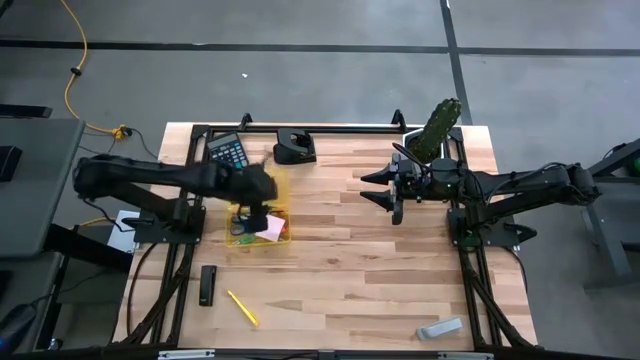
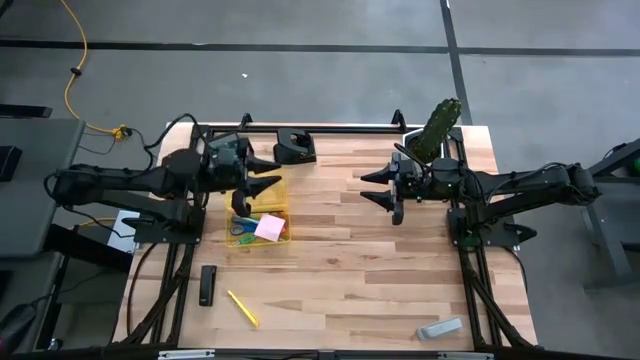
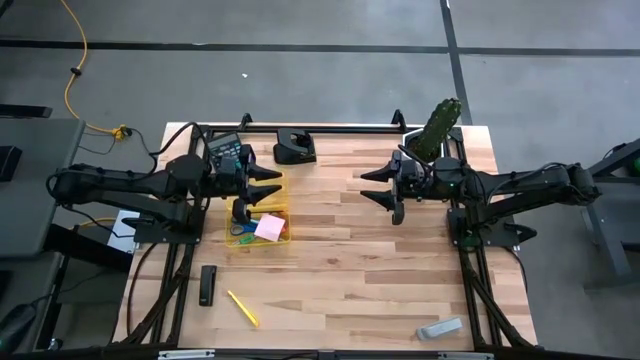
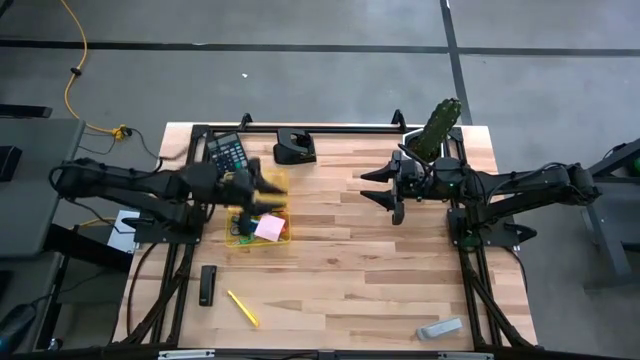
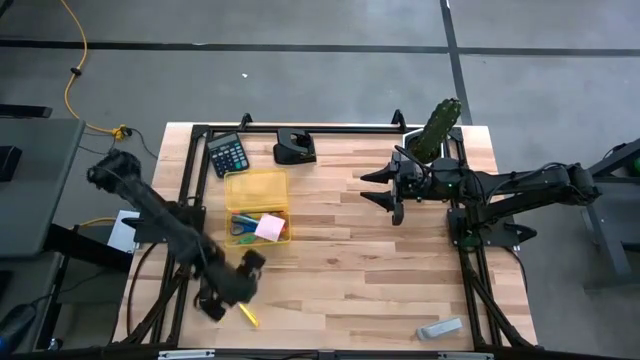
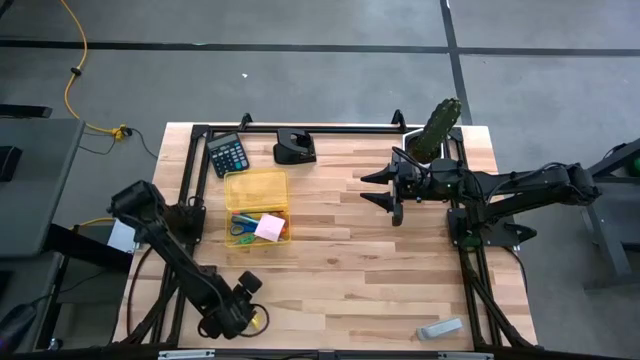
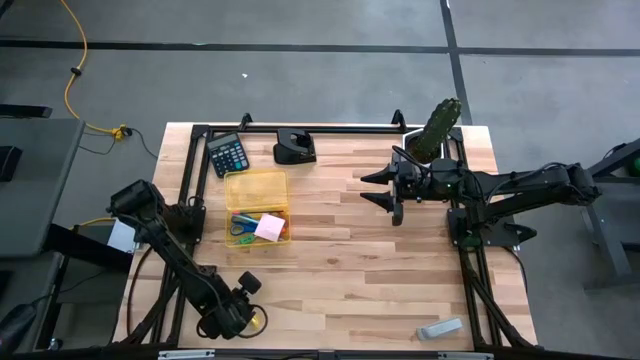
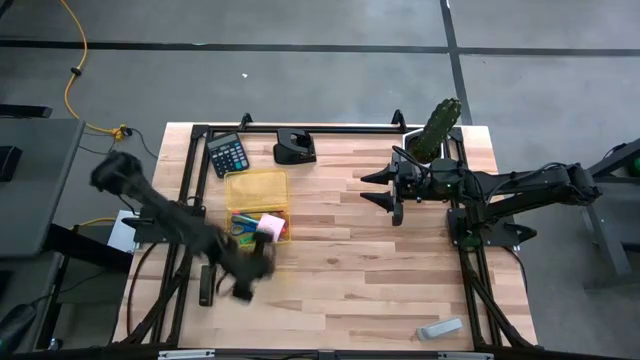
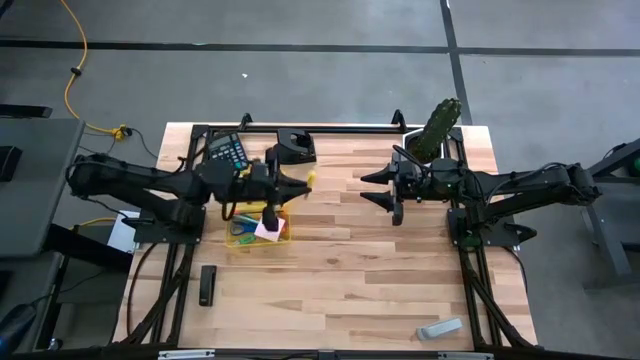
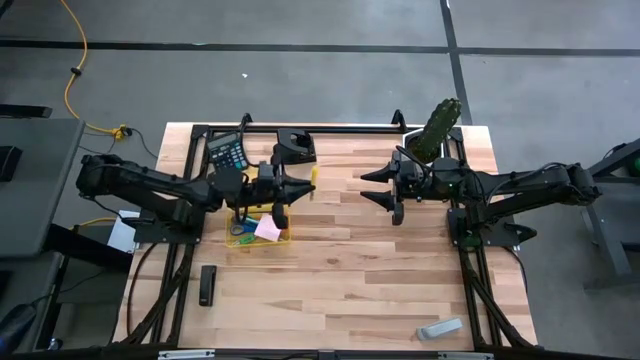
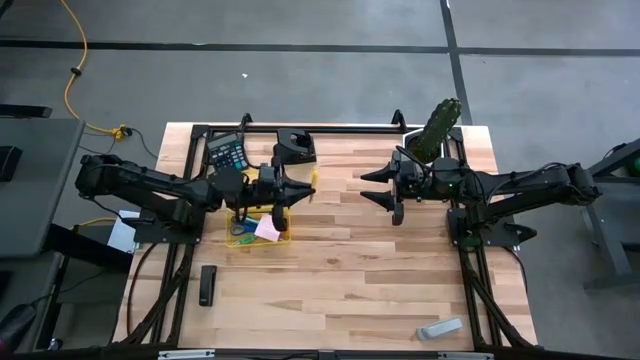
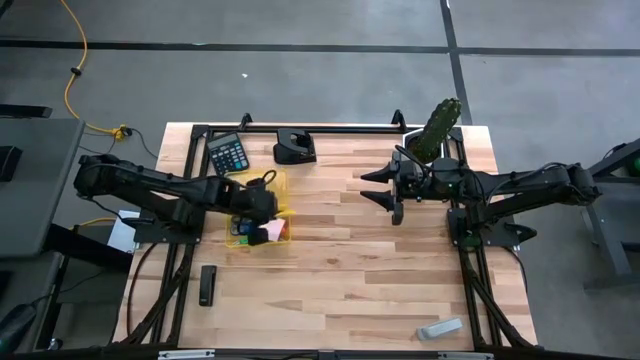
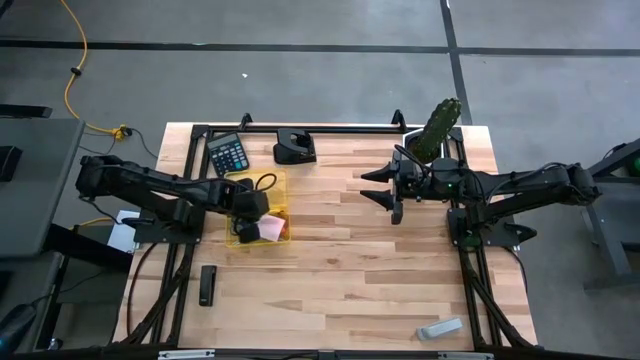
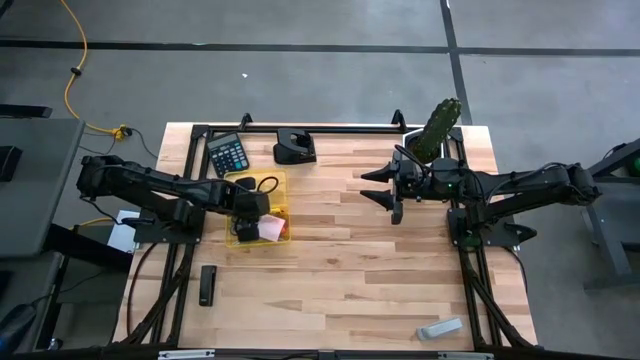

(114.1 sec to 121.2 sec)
Task: Pack school essentials
Put the yellow pen into the yellow supply box

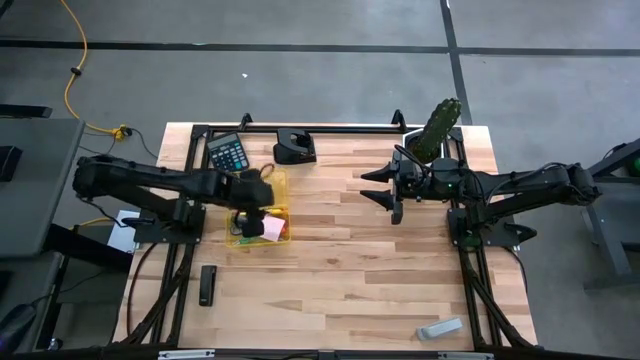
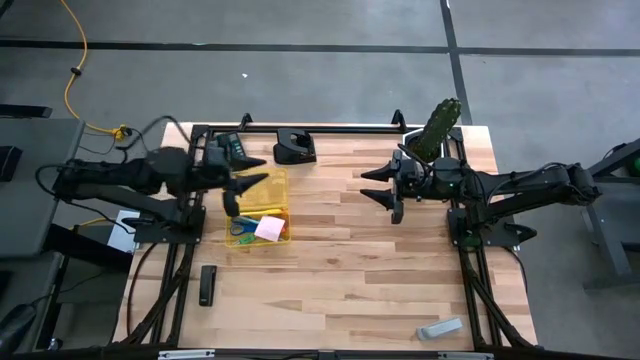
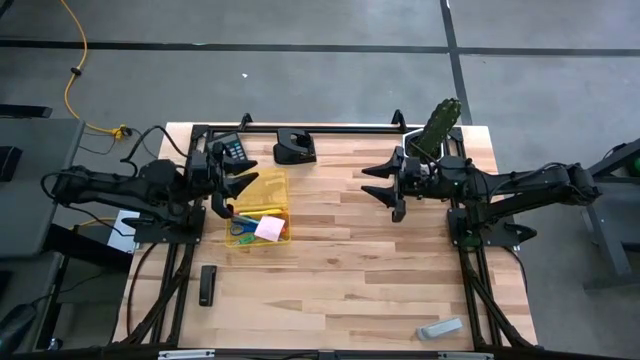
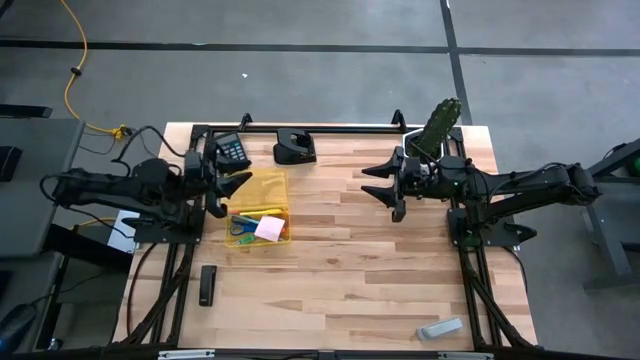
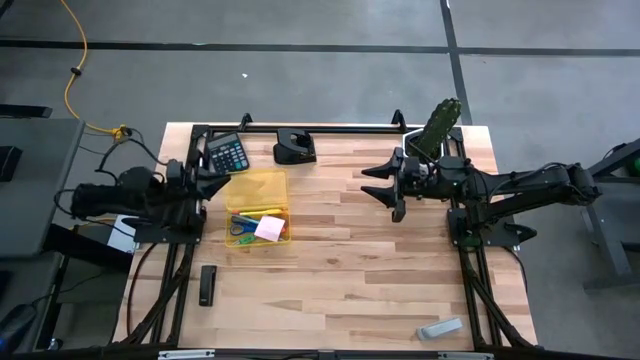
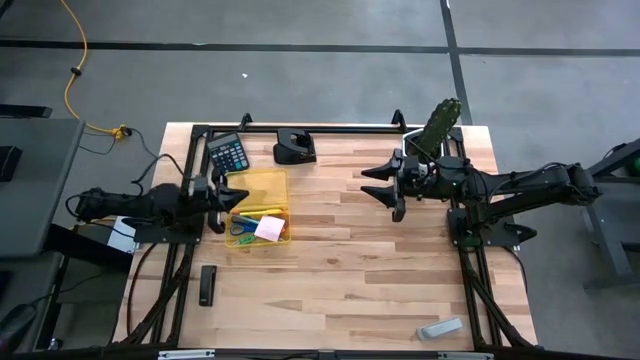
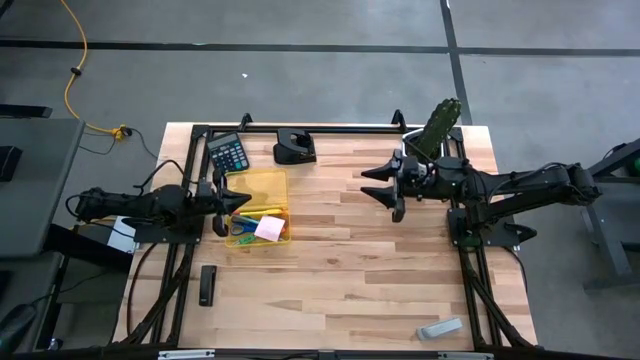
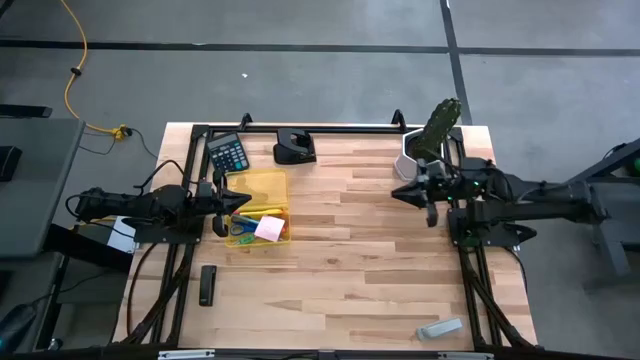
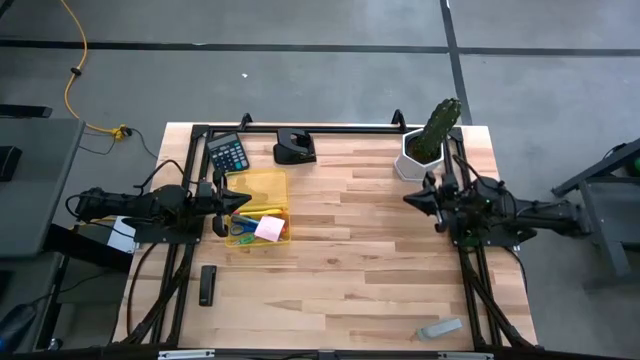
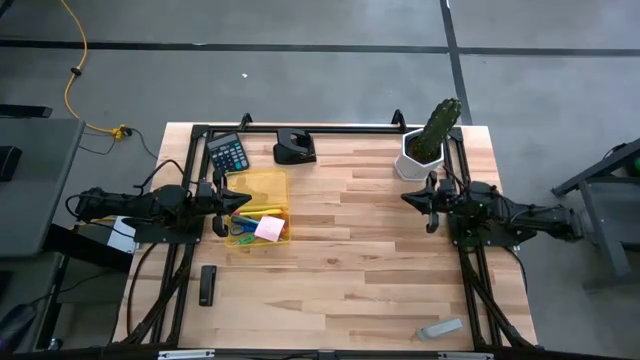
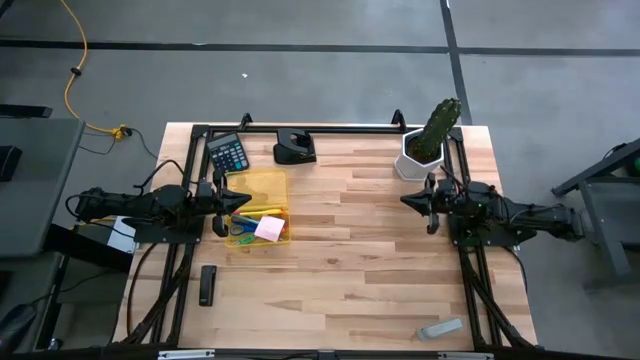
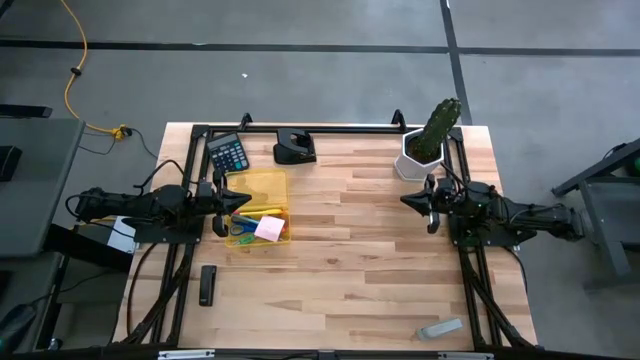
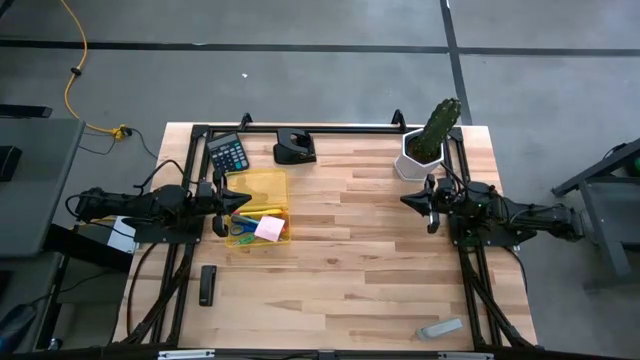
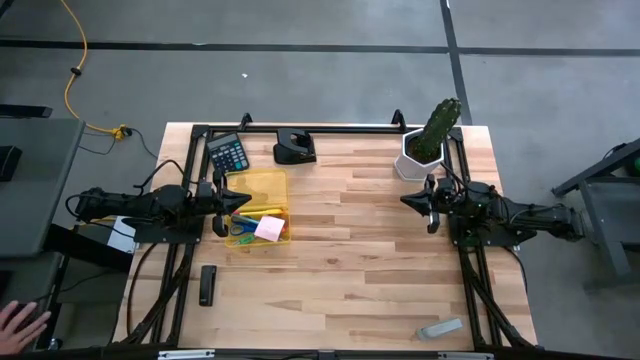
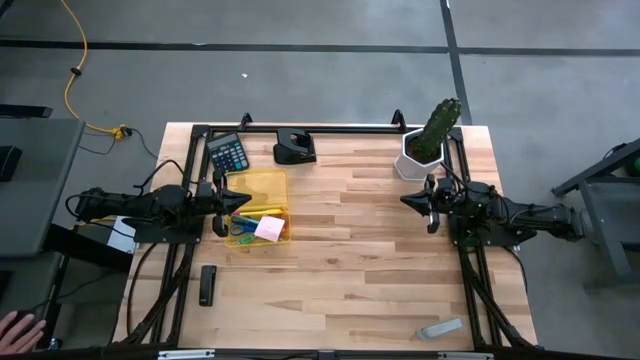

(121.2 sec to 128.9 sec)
Return to Home Position

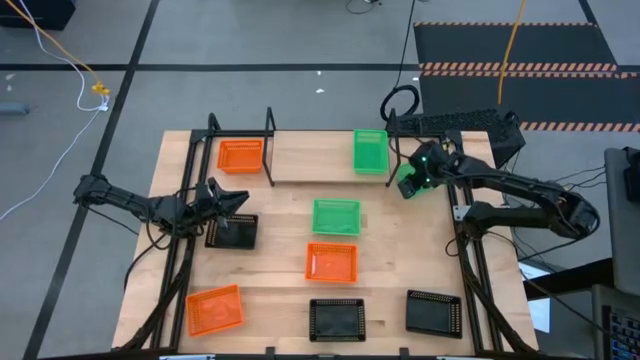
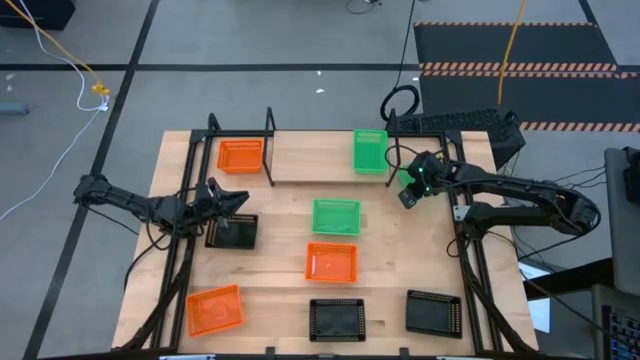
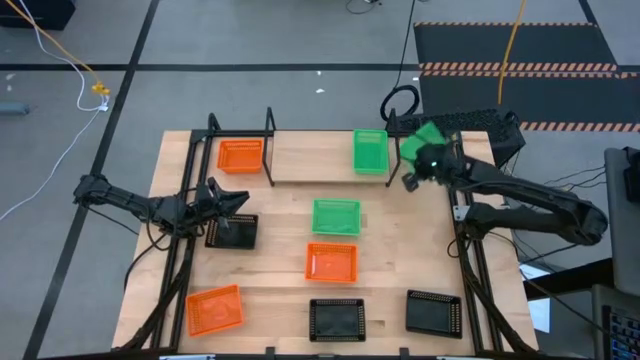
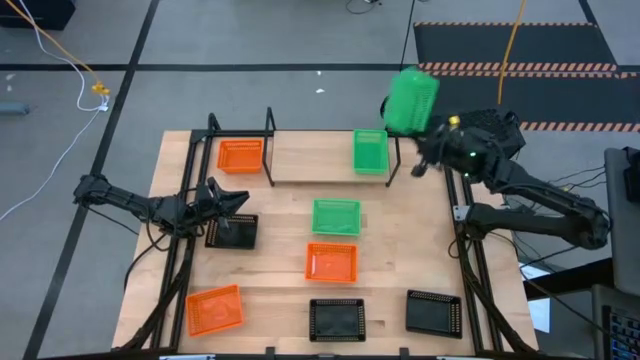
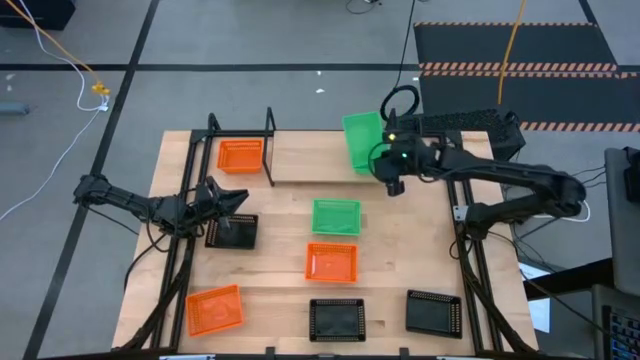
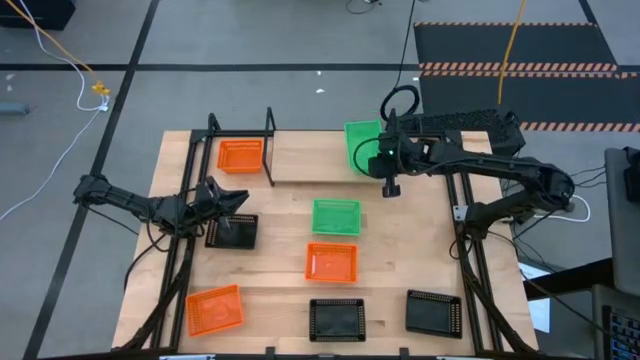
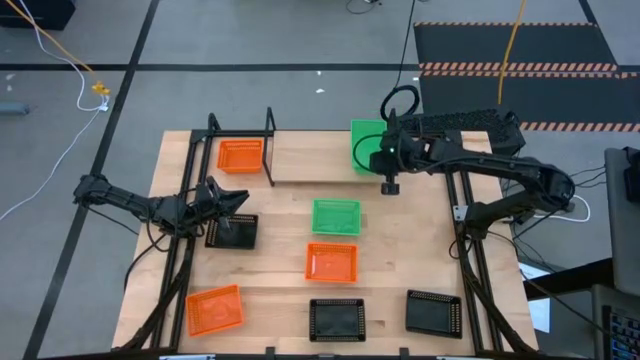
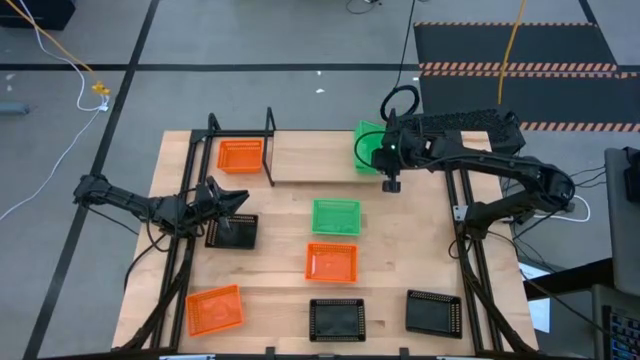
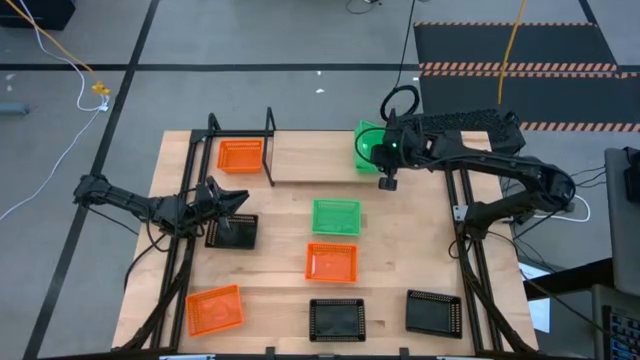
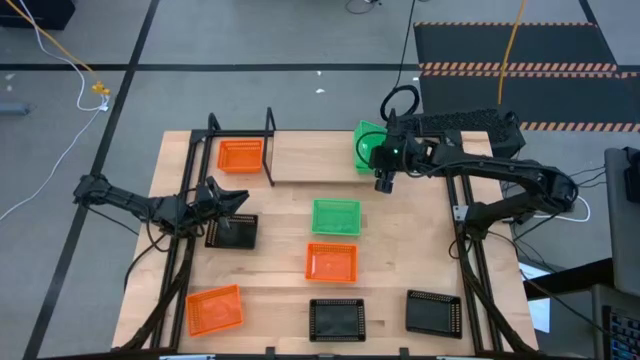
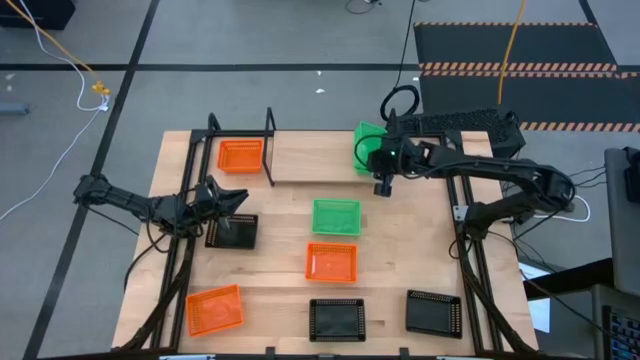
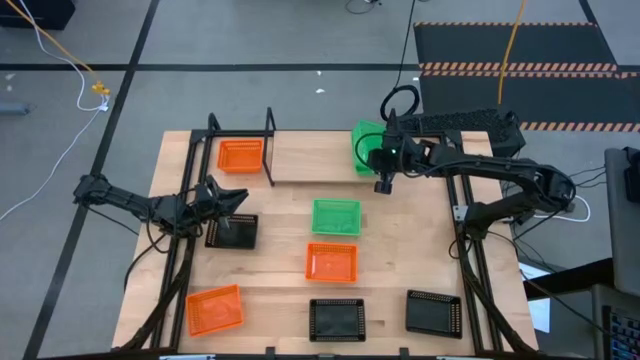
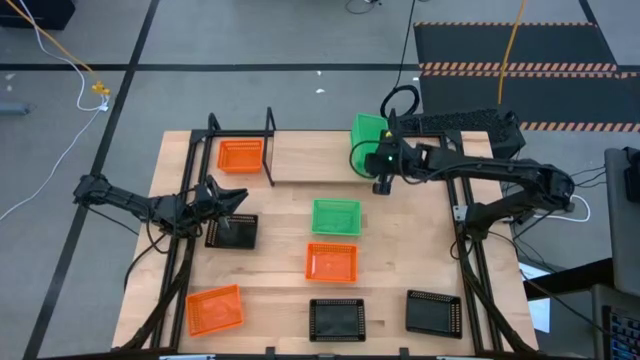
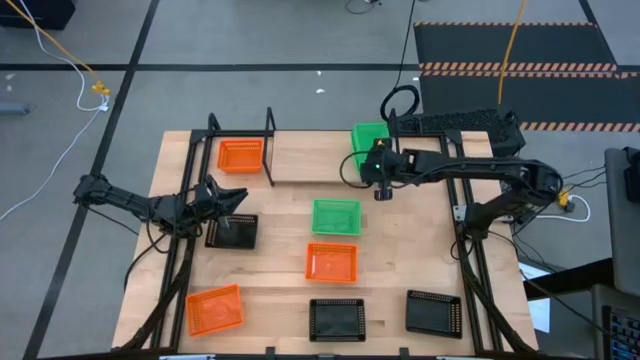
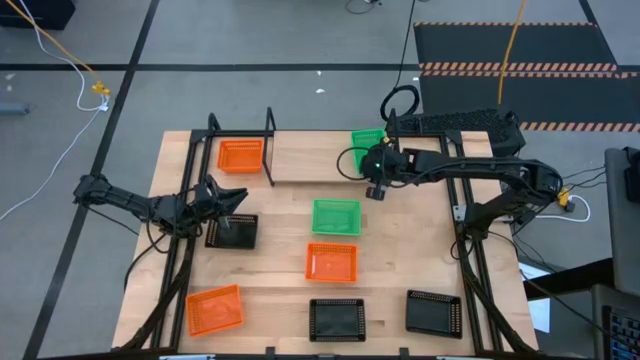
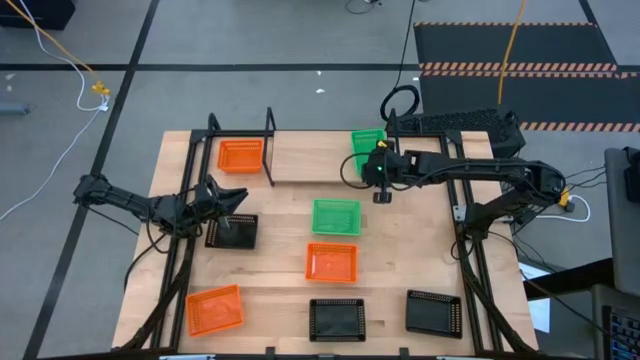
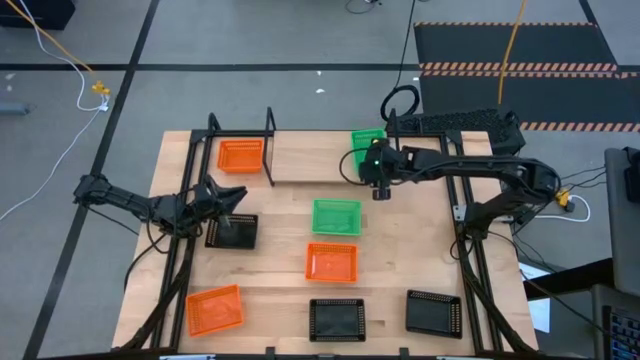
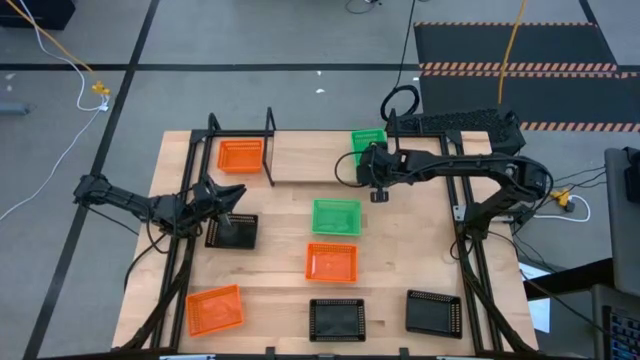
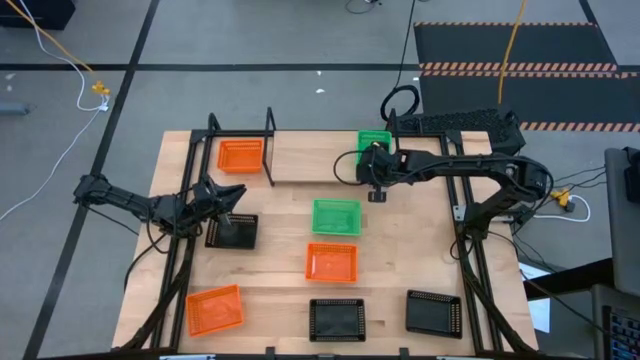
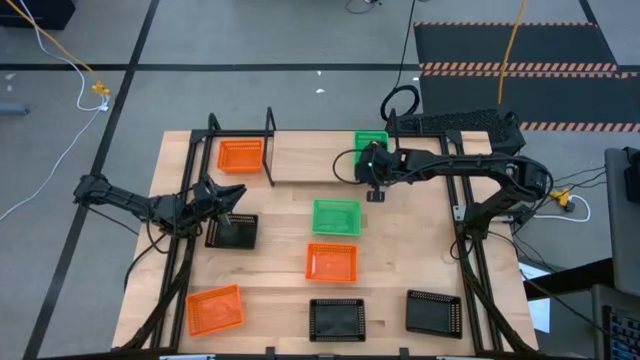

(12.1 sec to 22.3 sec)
Task: Stack baskets on shelf by color
Stack the right green bin on top of the green bin on the shelf
